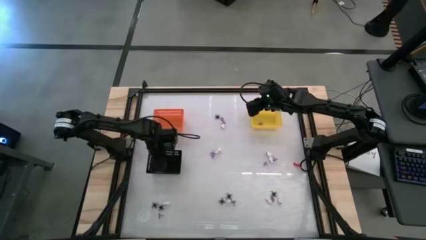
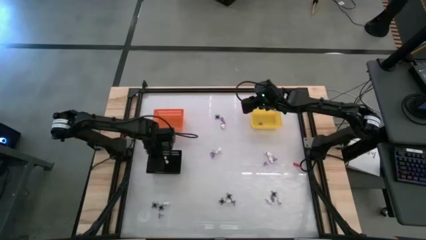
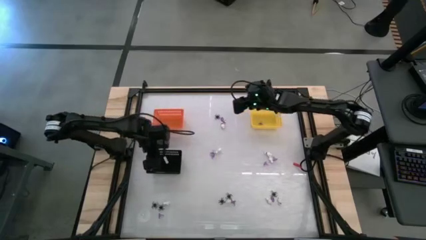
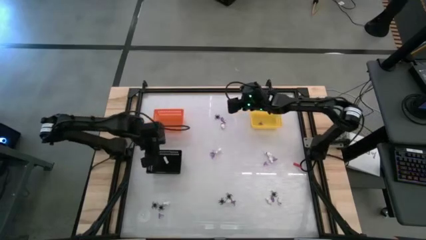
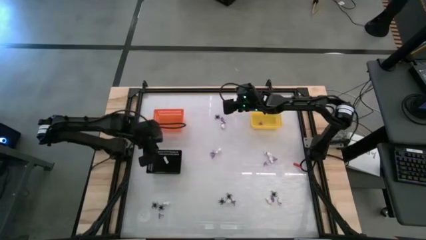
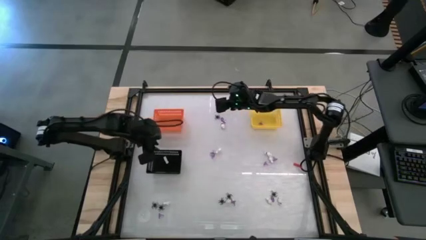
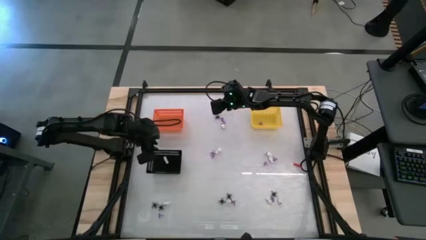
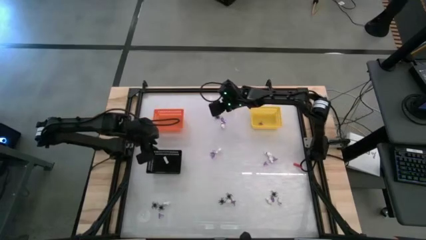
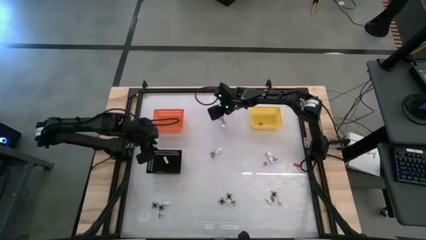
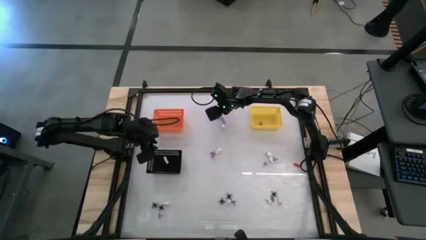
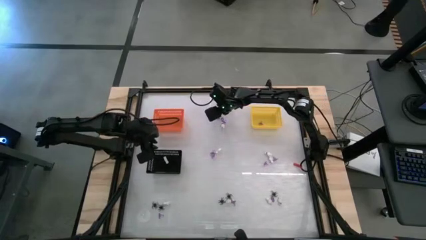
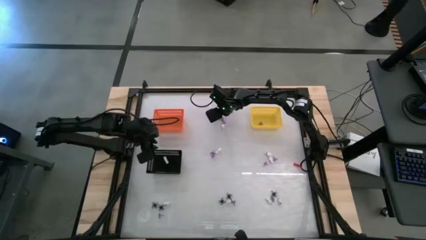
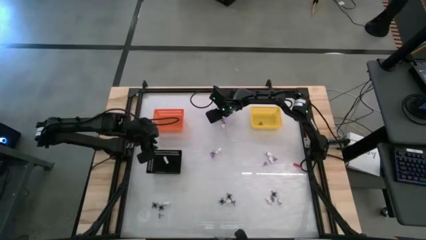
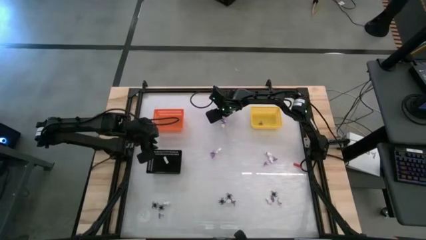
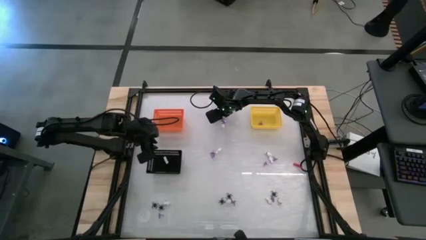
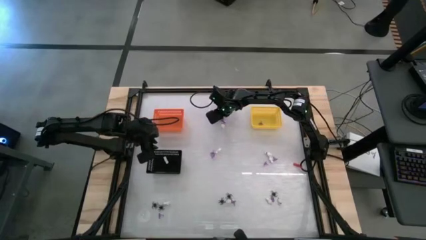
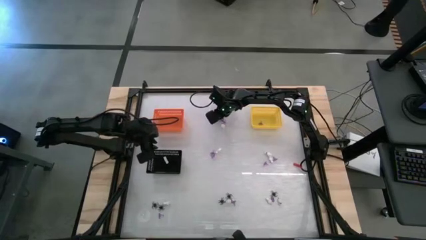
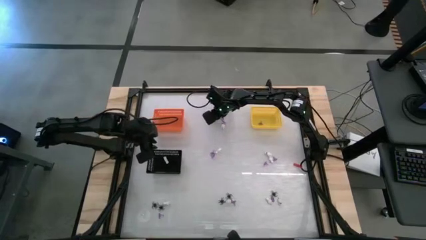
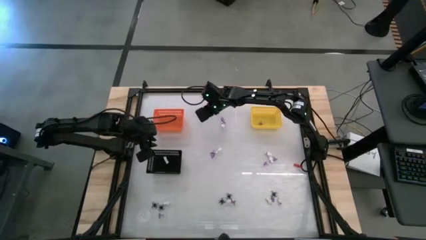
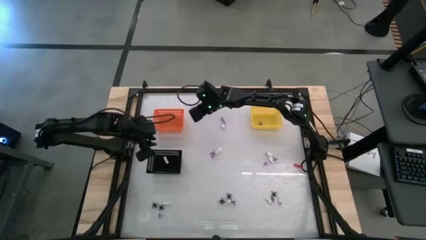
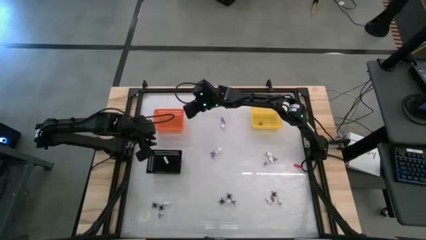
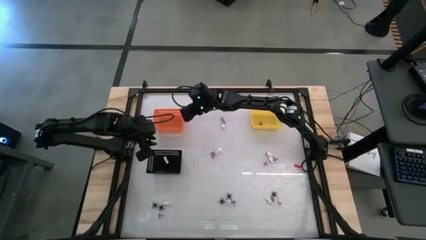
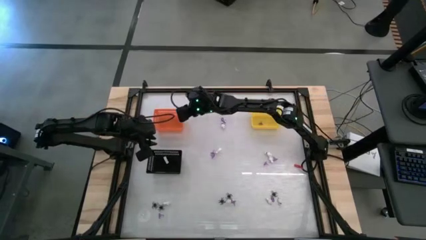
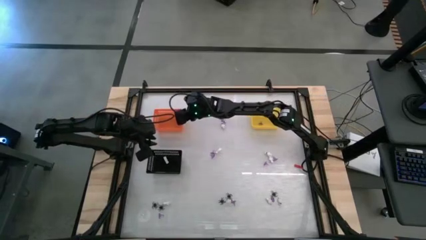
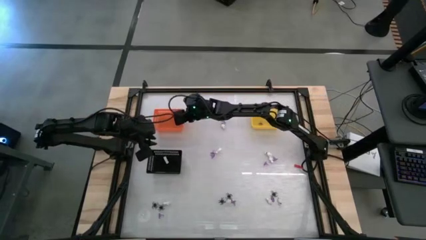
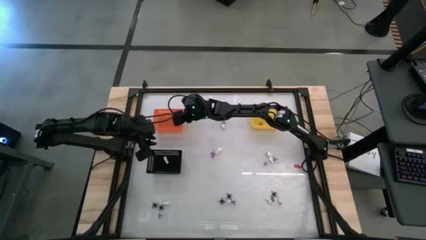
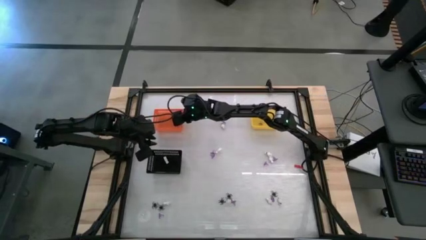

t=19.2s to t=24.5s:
Task: Sort Halloween decoration
Put the black spider toy into the orange bin

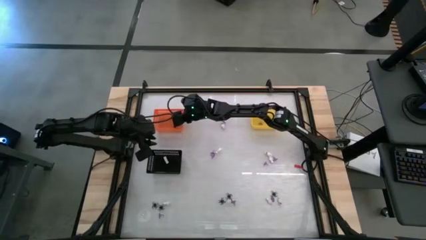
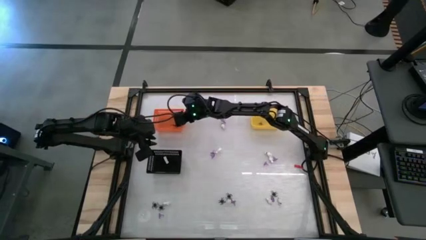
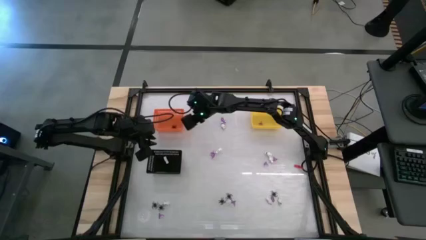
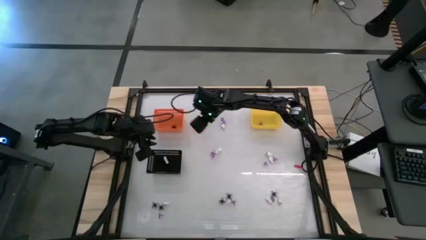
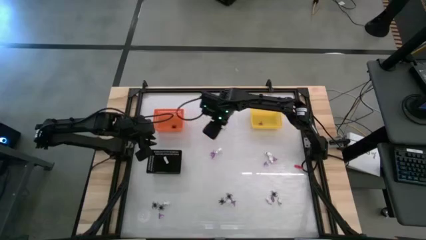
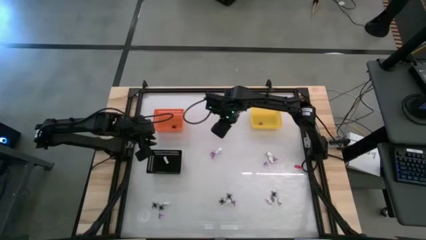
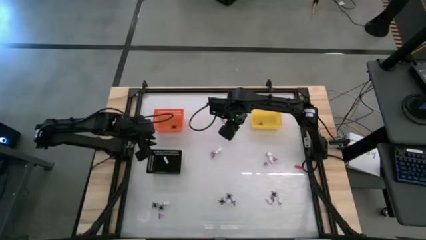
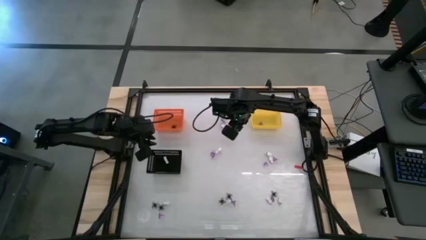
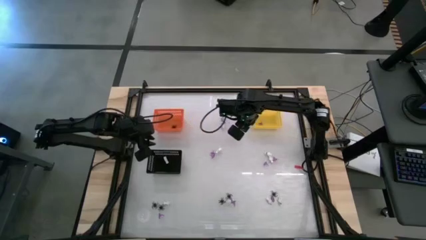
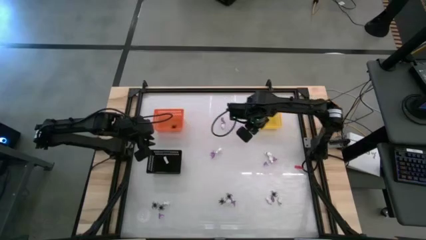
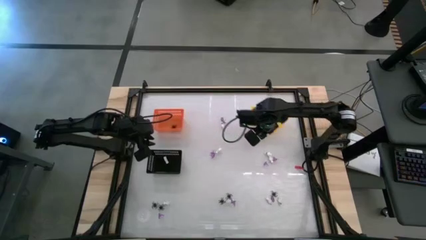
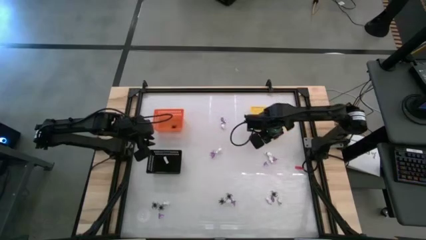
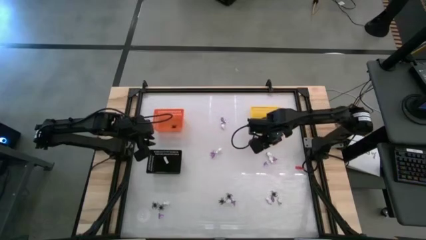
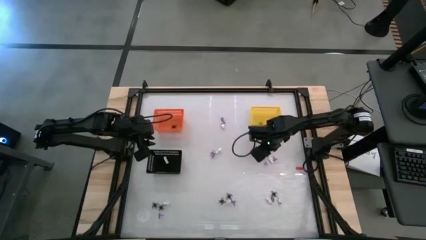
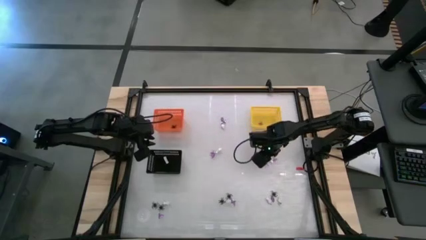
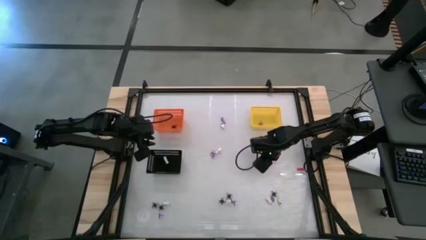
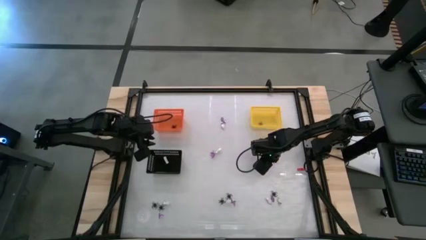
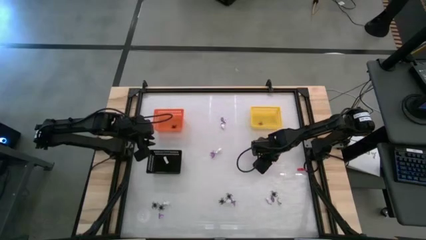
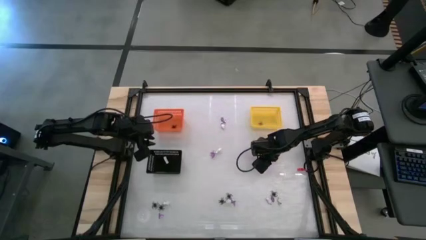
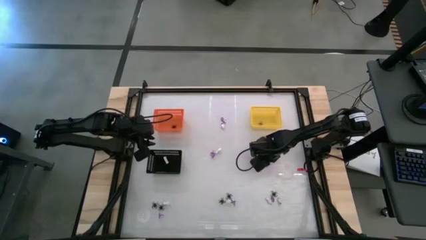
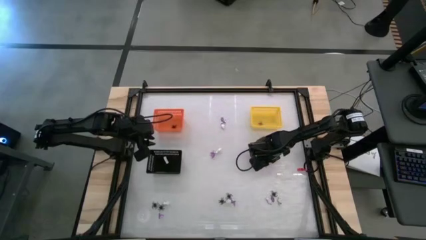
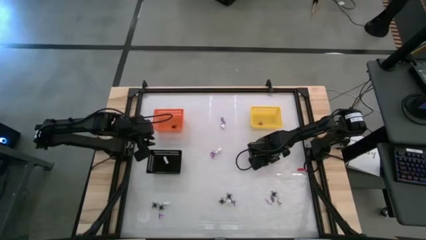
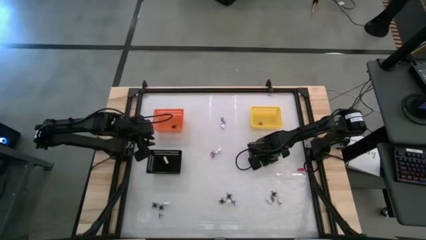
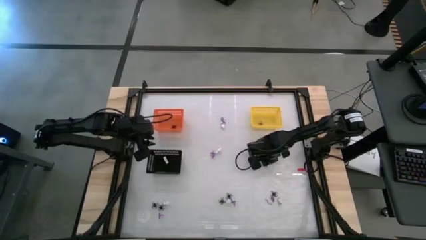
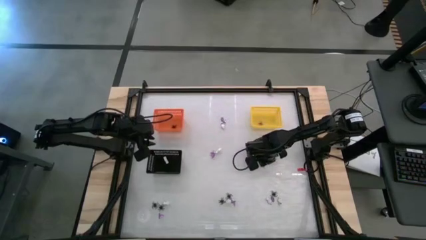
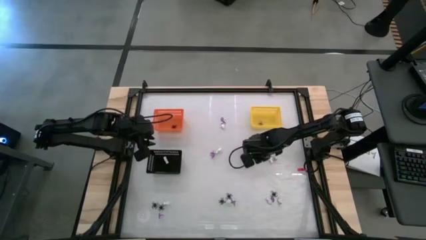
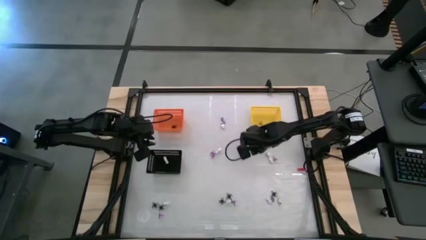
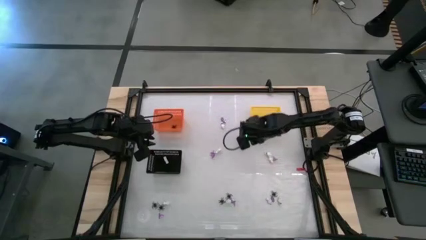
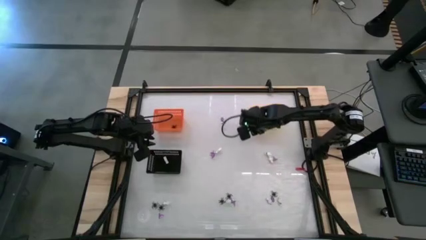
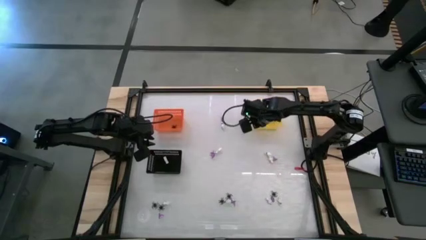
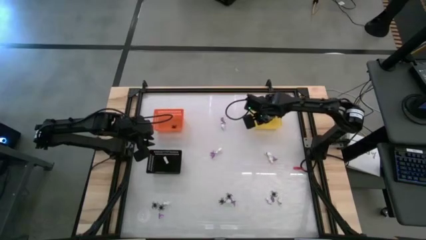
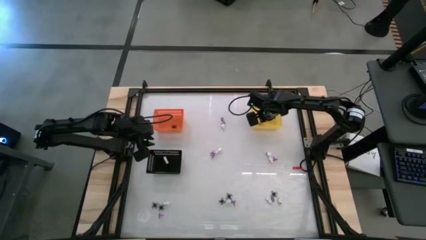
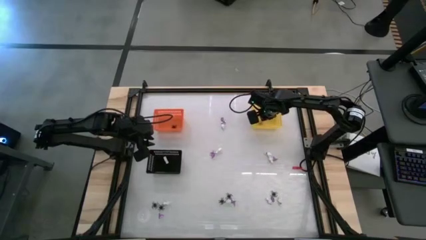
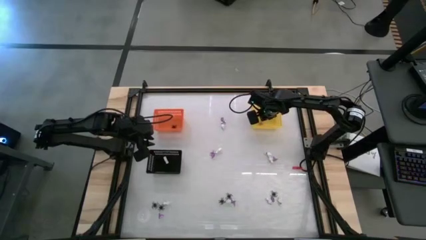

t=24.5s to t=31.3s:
Put the violet witch hat into the yellow bin

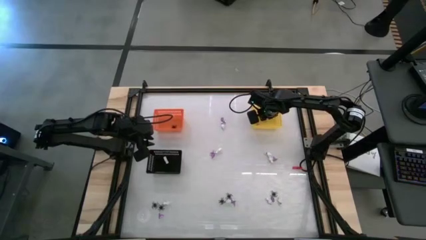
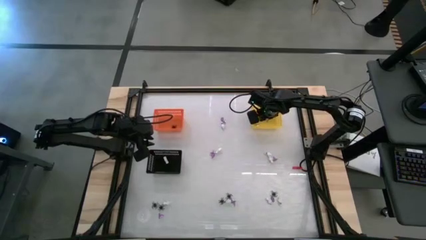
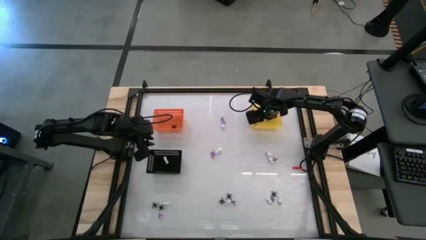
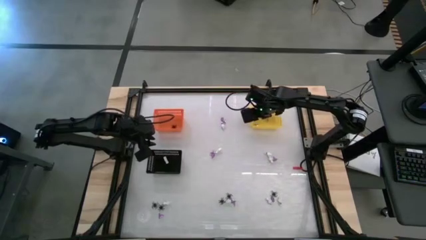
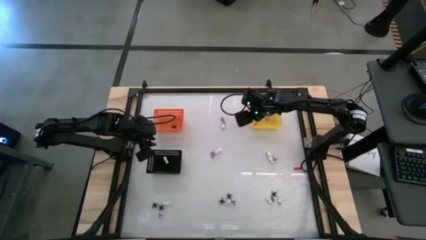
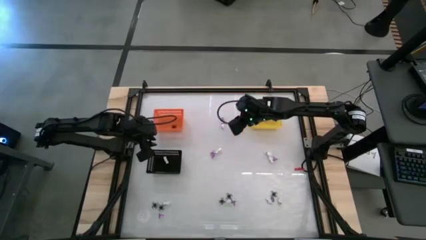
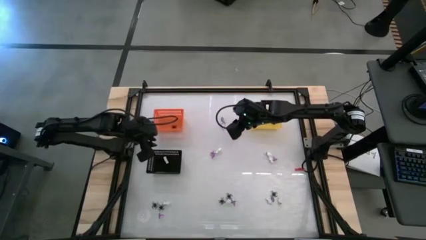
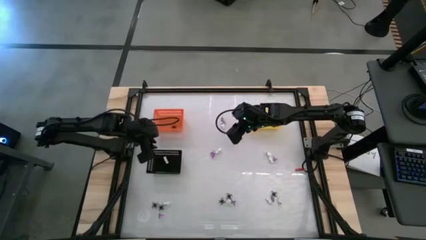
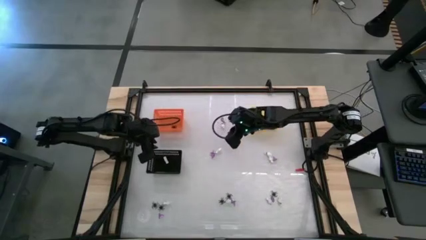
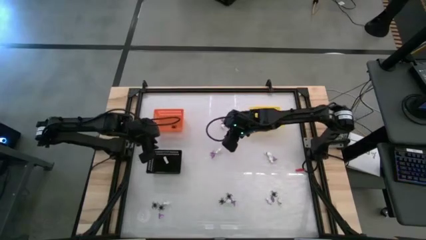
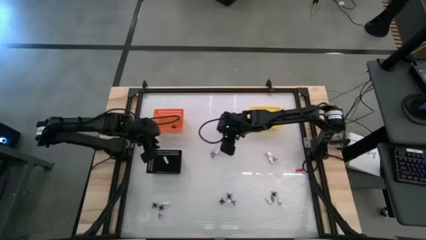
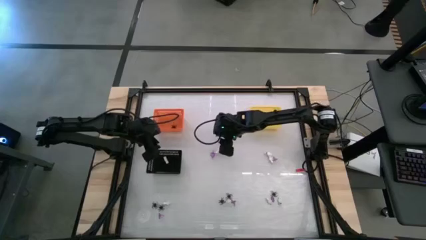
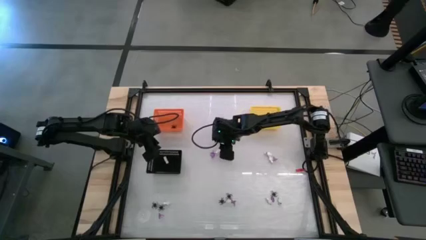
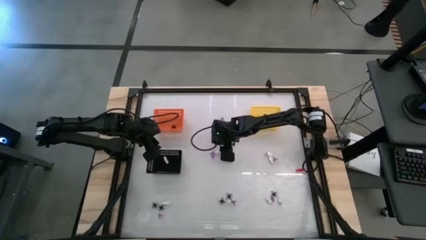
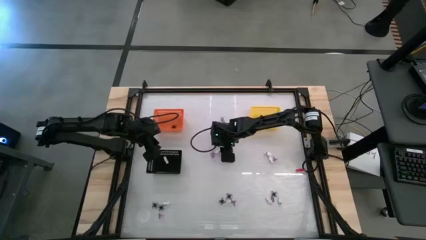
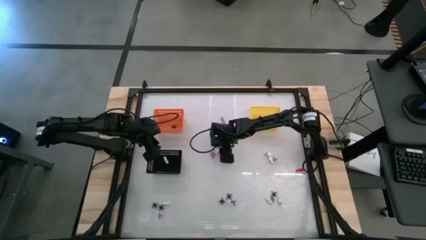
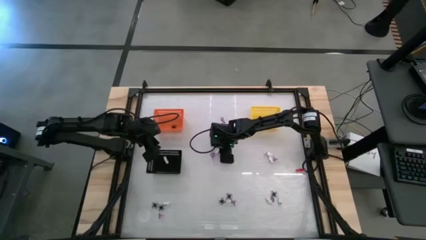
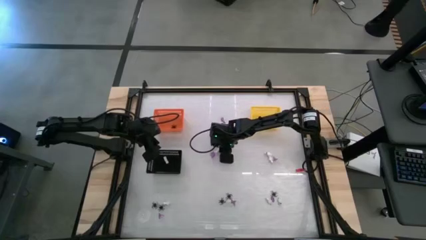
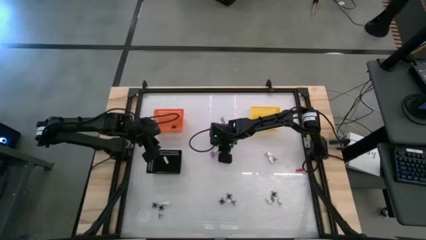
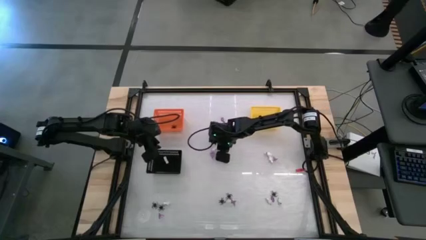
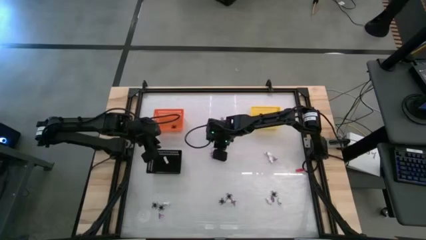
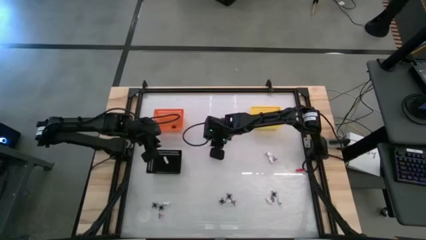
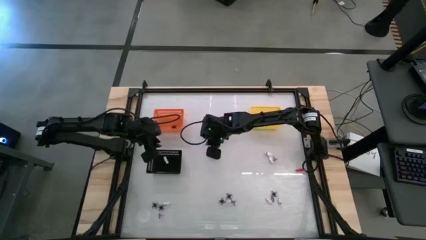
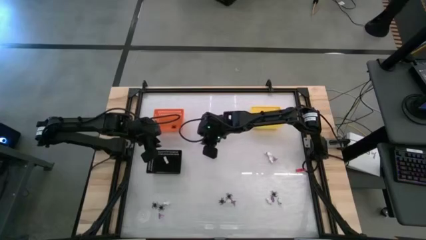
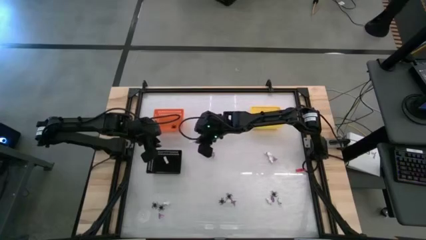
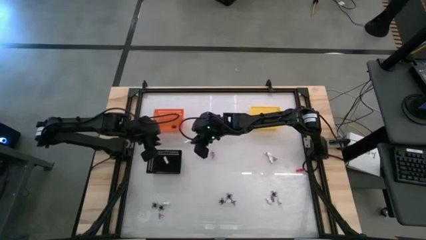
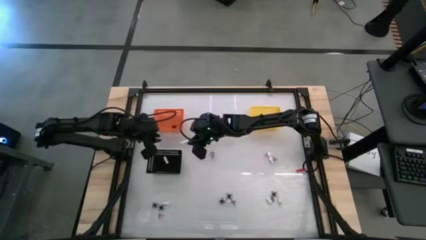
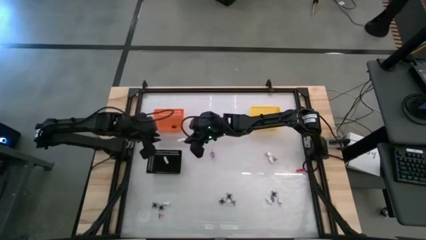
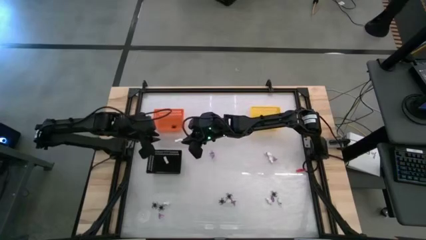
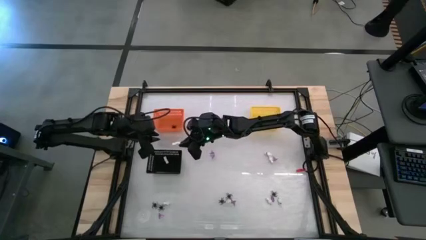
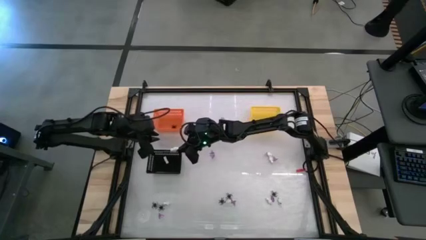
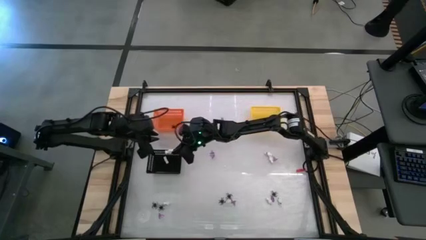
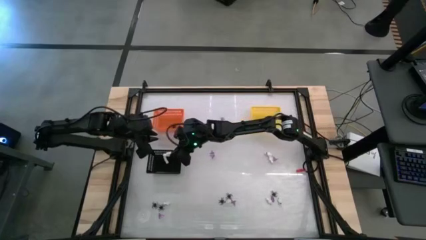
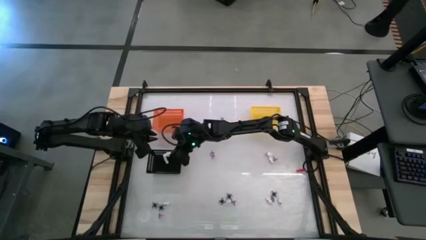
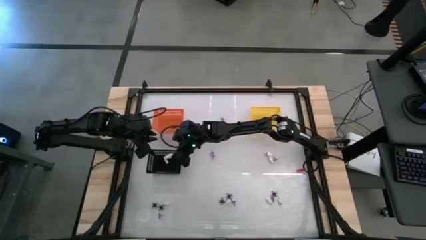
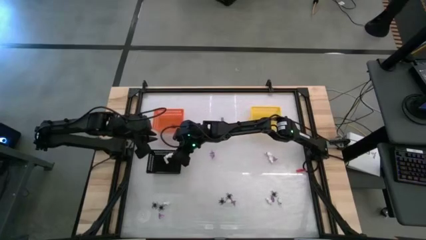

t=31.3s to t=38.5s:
Put the white skeleton toy into the black bin
